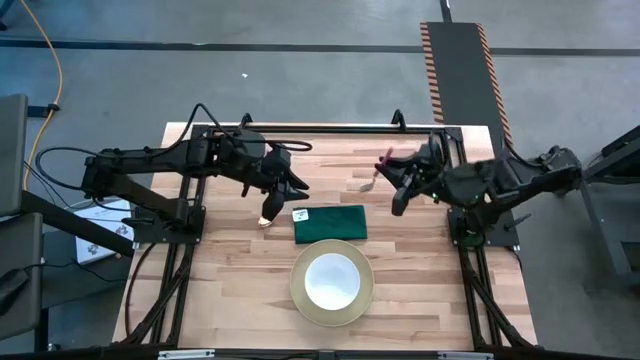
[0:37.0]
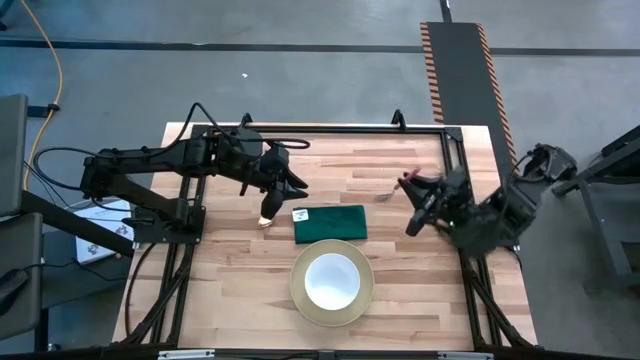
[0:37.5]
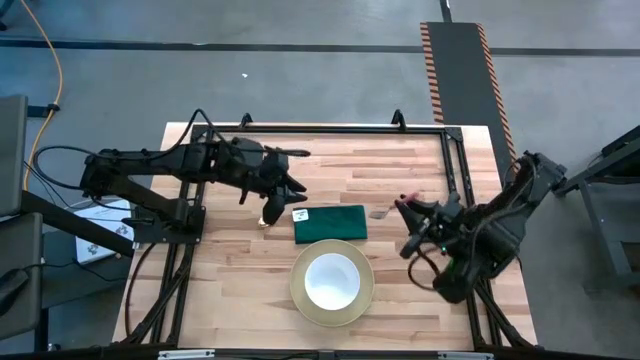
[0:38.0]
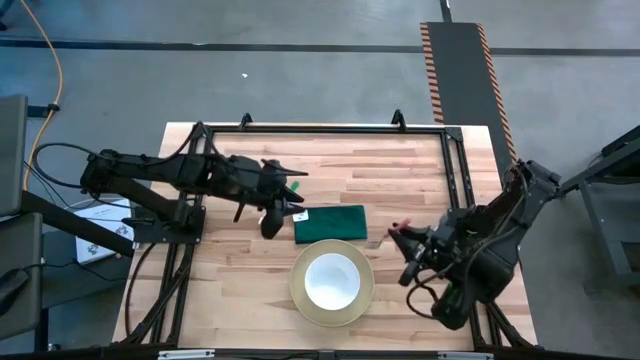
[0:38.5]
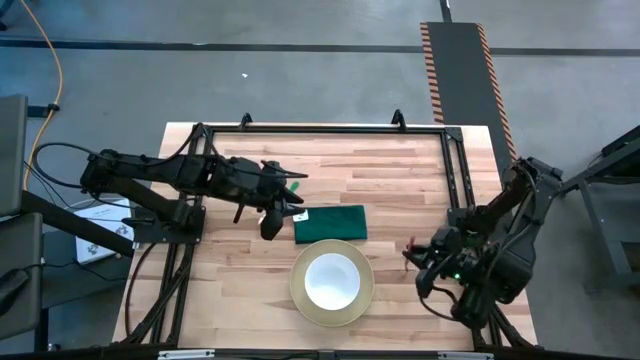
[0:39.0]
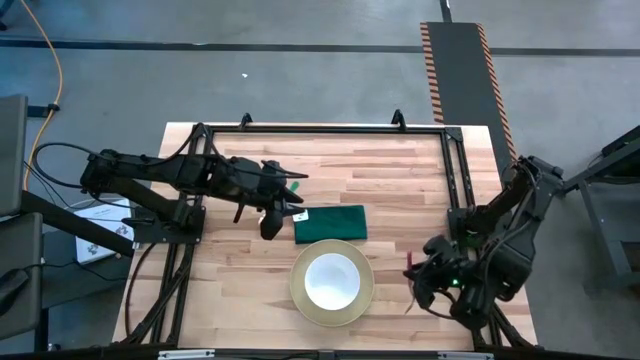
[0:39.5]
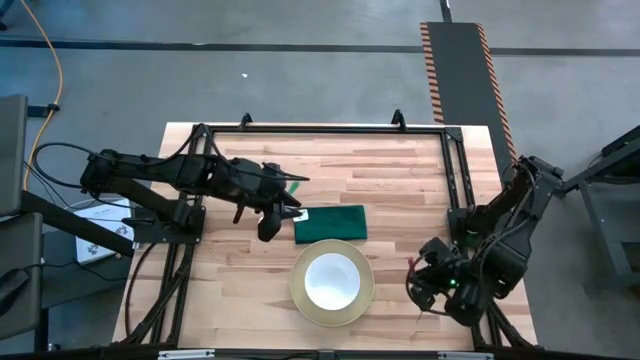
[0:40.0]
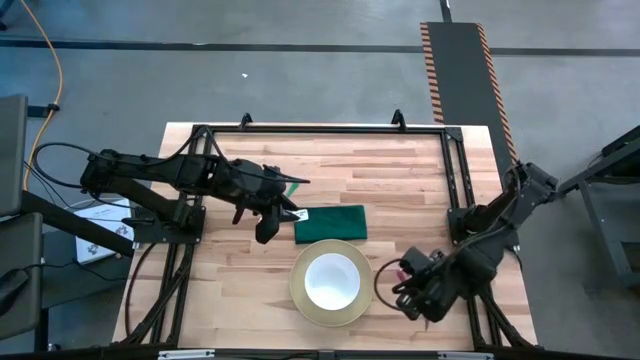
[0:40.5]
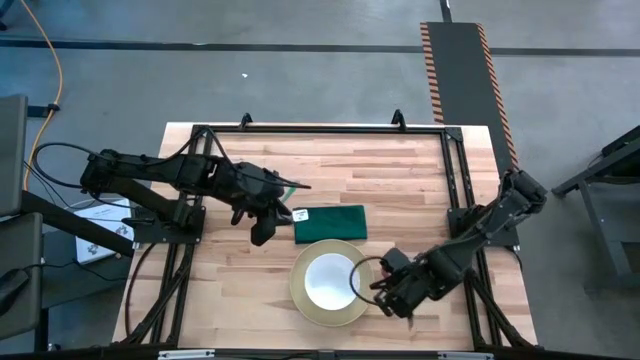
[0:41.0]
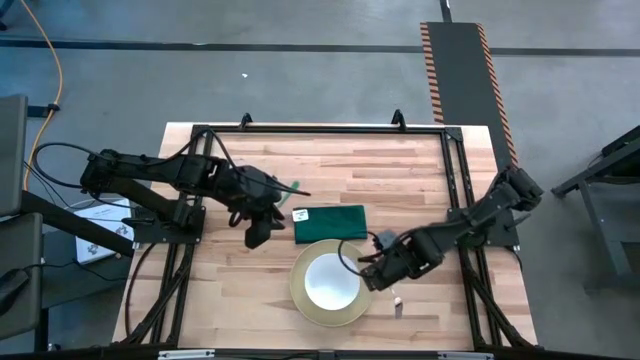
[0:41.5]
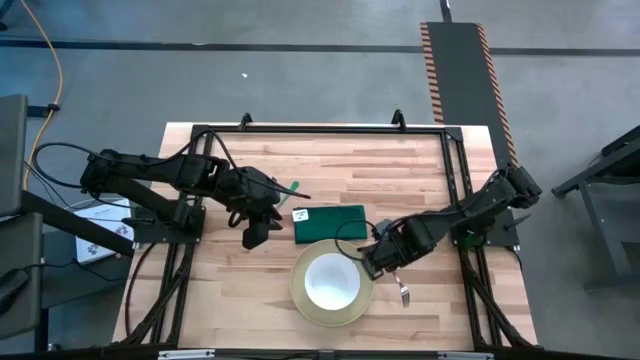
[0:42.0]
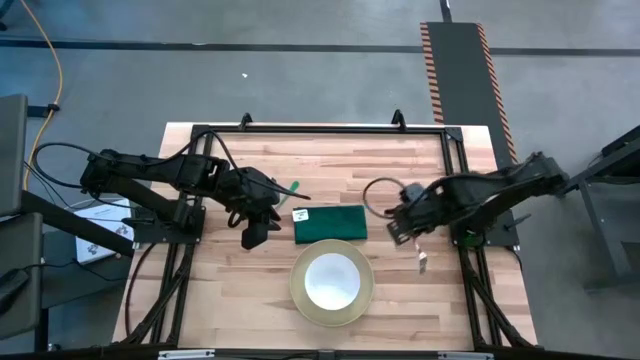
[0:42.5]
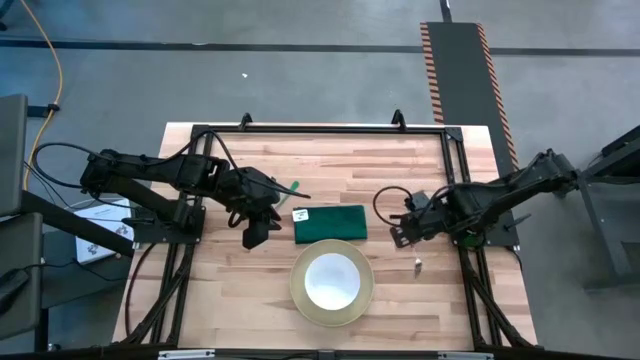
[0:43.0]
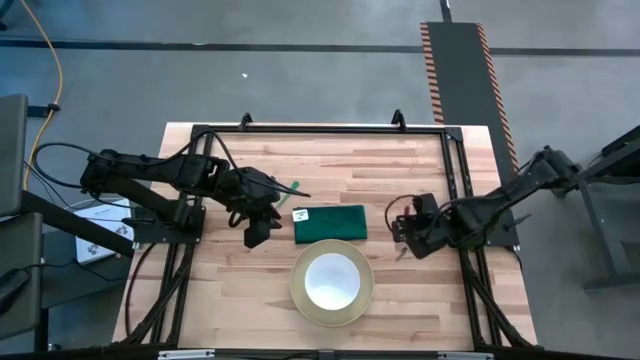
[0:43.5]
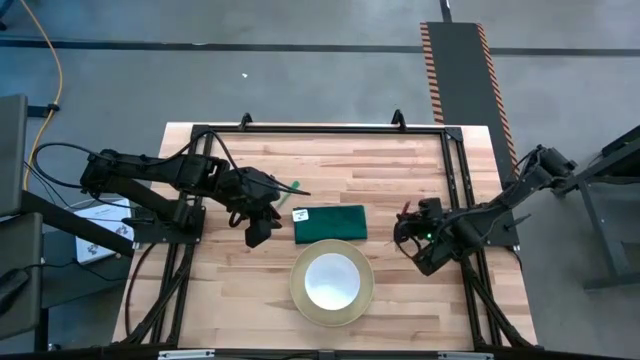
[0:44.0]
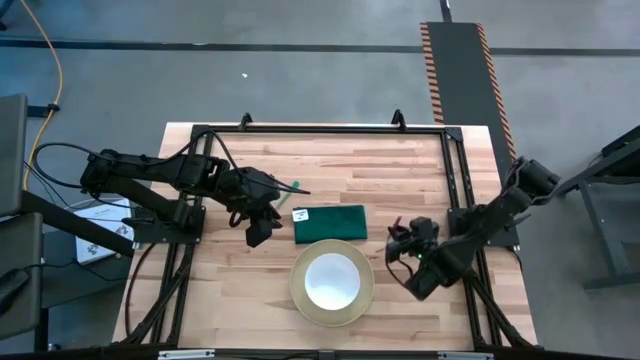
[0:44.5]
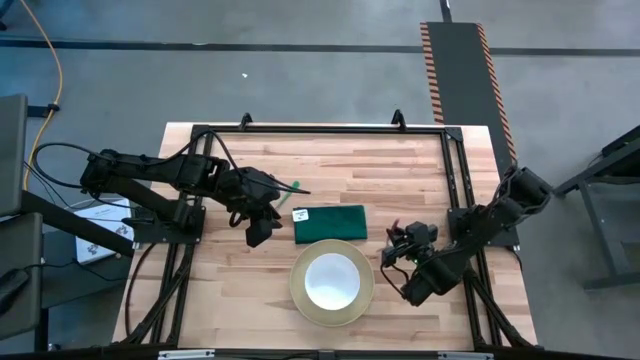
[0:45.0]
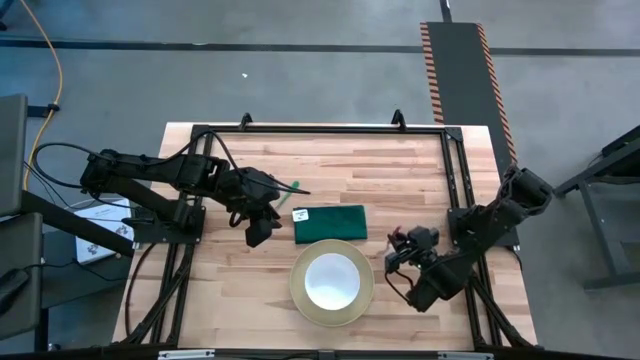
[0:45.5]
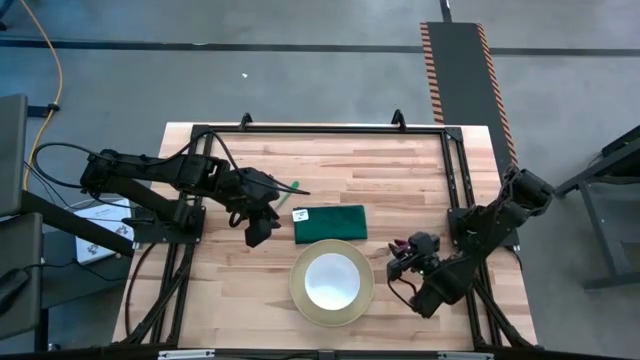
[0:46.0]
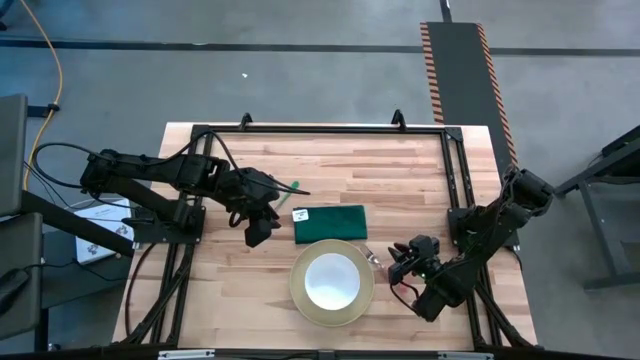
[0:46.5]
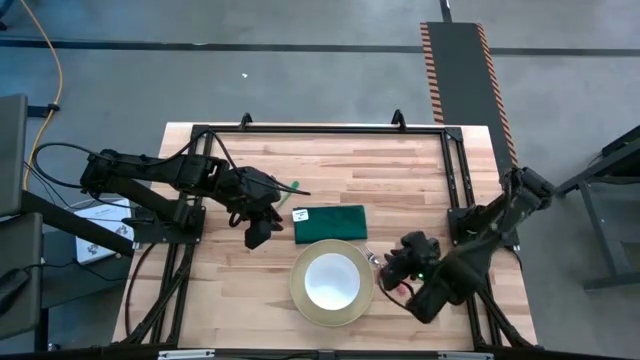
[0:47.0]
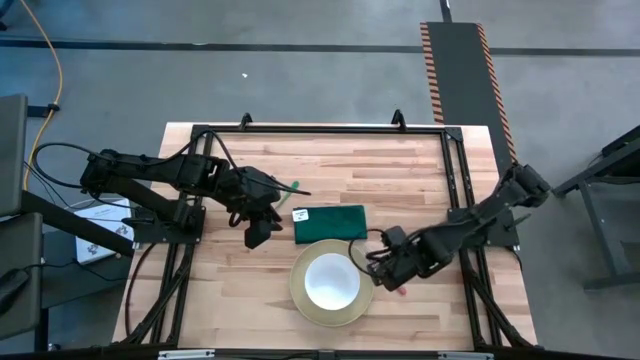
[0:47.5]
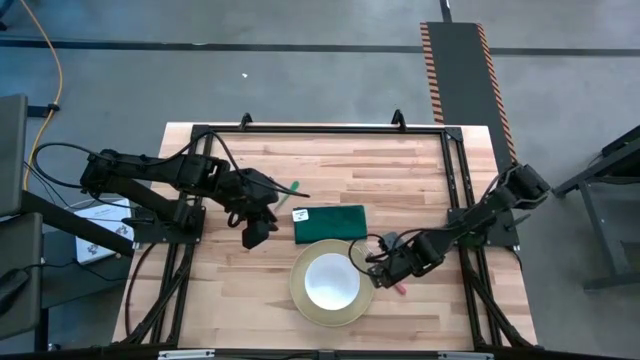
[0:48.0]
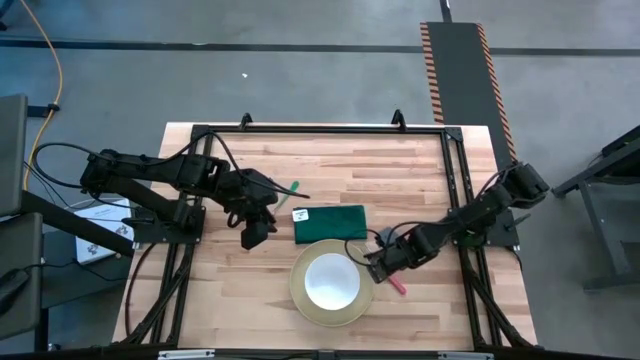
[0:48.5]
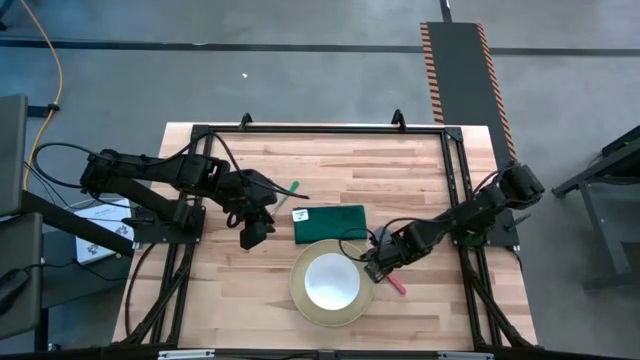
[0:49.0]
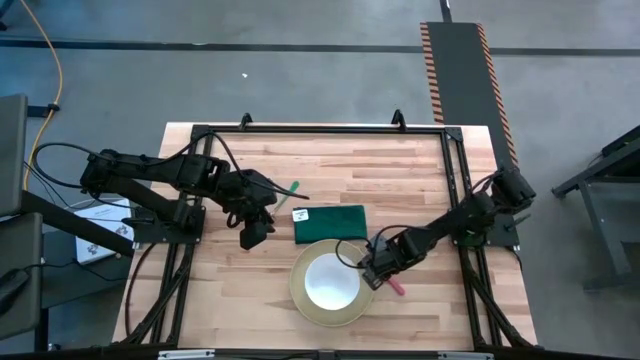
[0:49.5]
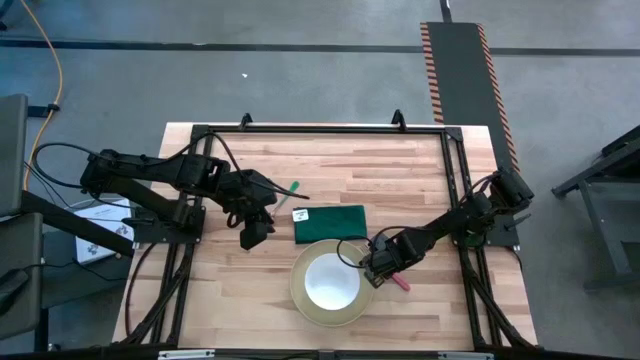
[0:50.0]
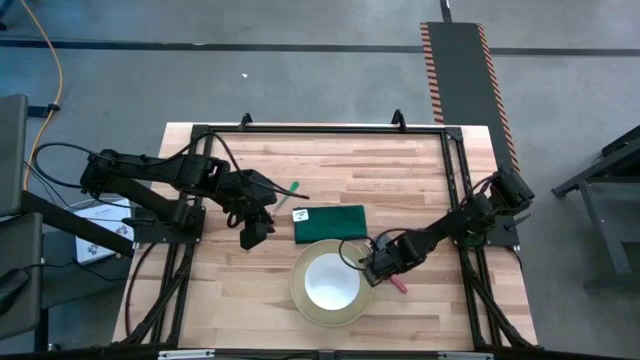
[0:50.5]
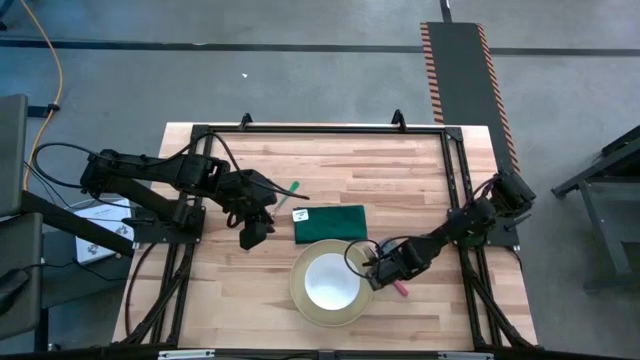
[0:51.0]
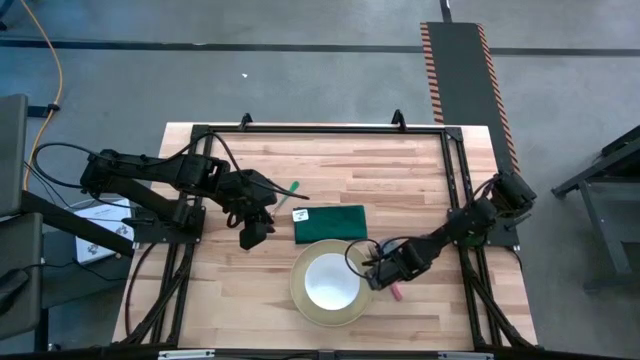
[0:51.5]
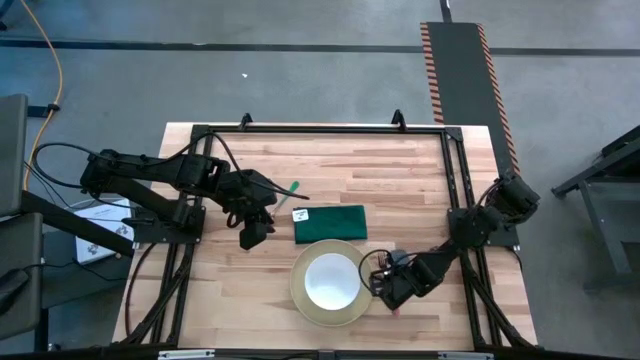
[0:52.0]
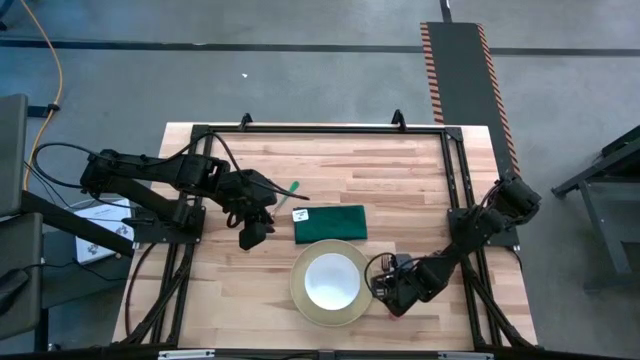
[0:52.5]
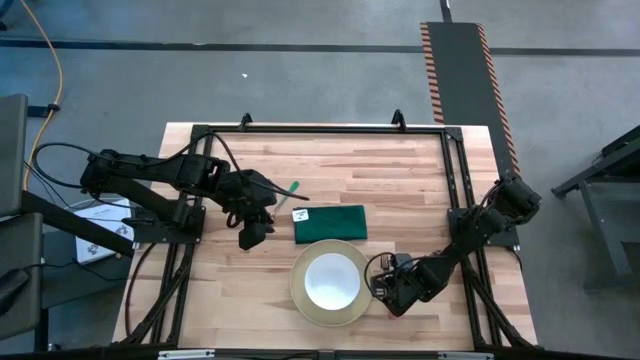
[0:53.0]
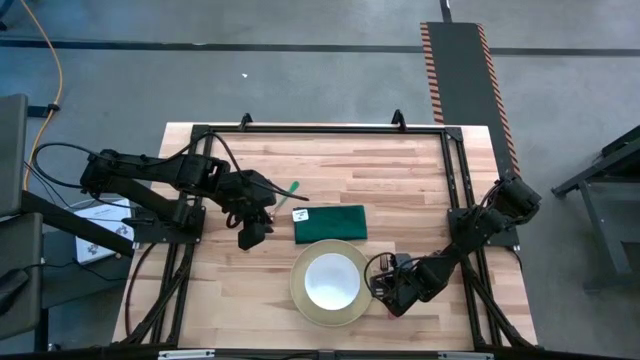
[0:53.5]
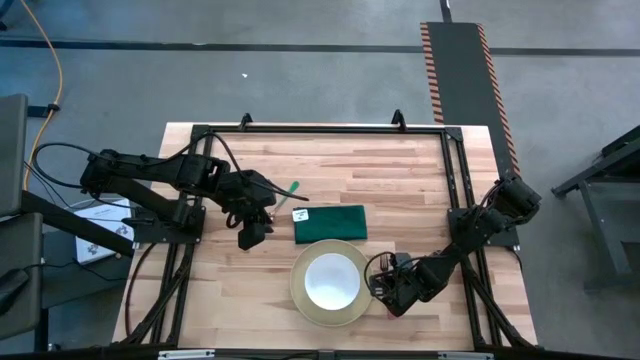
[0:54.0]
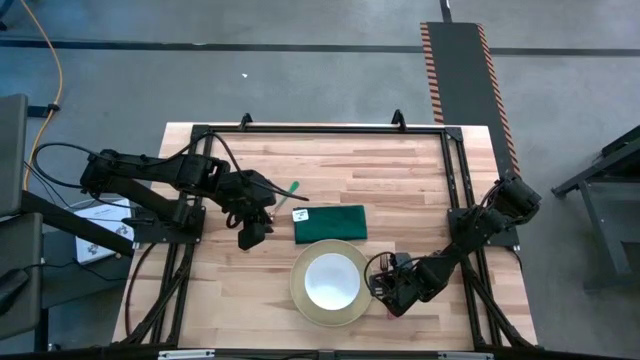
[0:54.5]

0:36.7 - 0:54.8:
Task: Set table place
Put the red fork to the right of the yellow plate

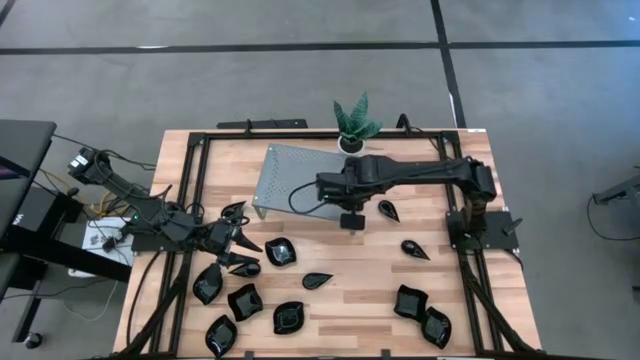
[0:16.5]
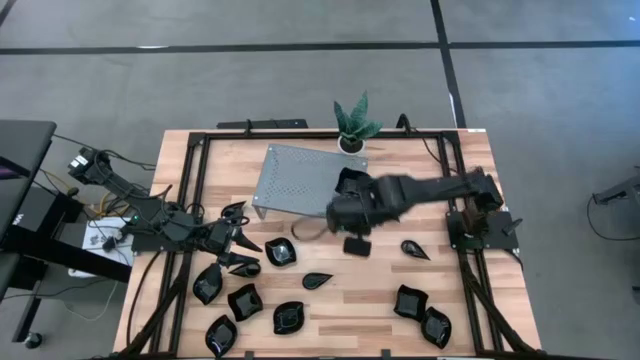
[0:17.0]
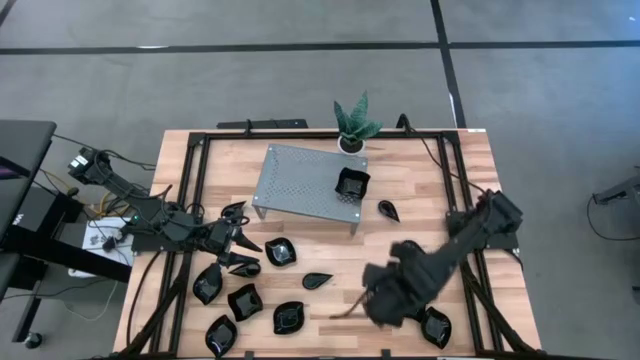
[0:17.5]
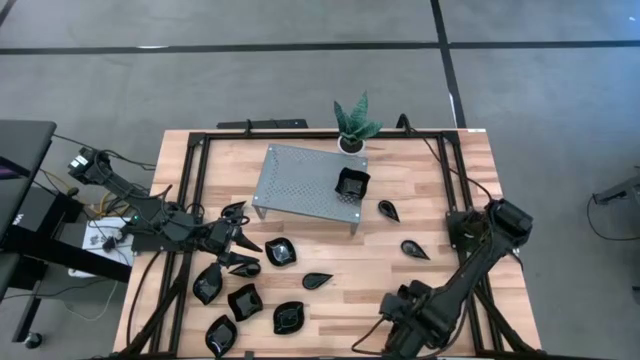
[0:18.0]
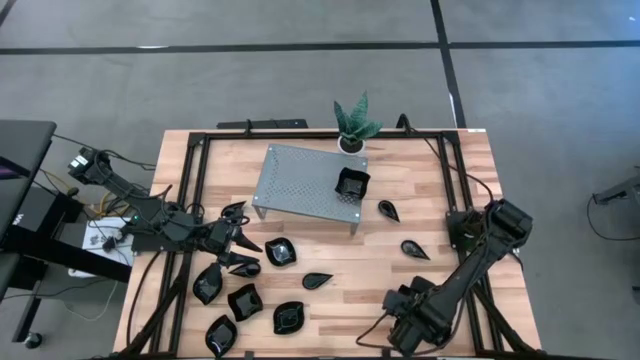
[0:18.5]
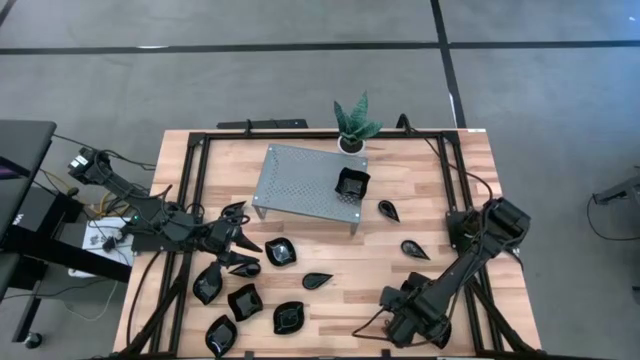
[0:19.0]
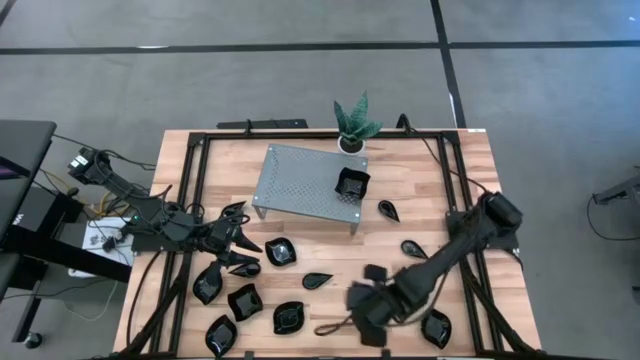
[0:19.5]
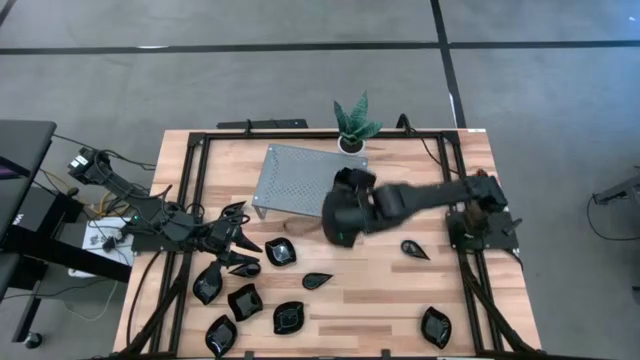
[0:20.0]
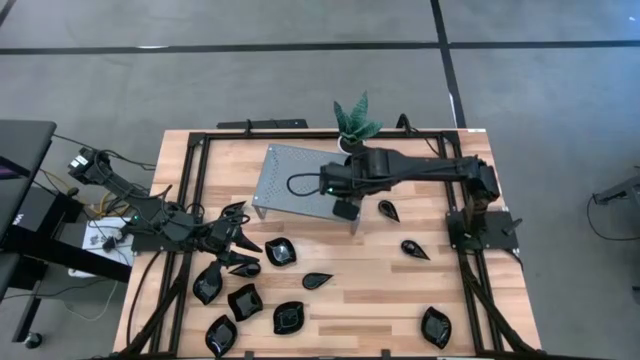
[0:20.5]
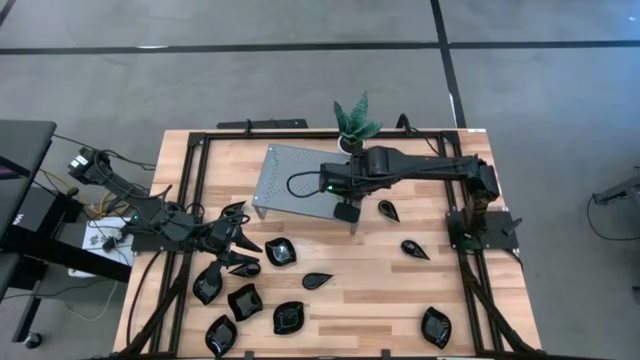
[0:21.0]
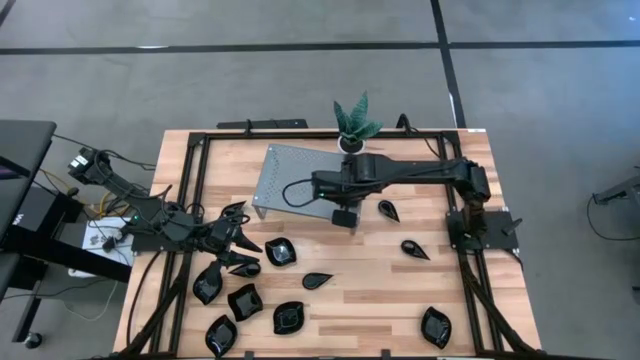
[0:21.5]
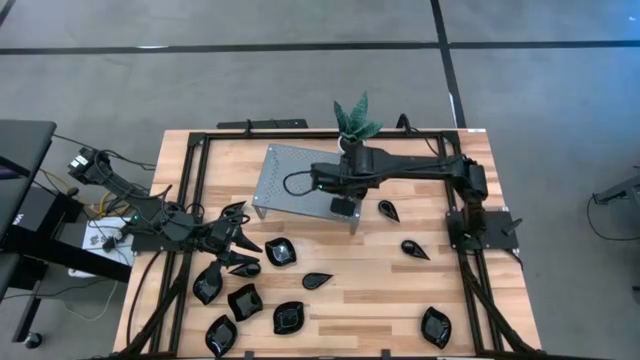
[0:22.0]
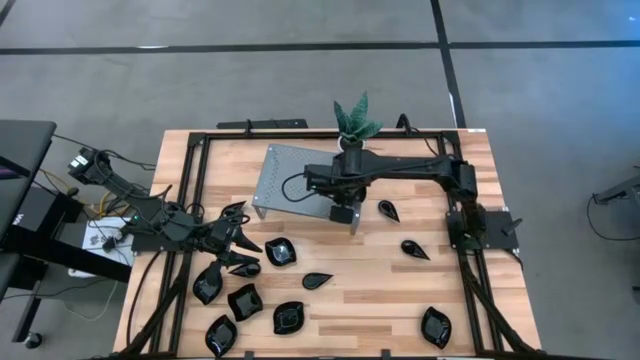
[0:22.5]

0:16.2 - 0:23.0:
Task: Pick & Place Mini shaped plates
Stack the distorted square plate on top of the distorted square plates on the shelf
